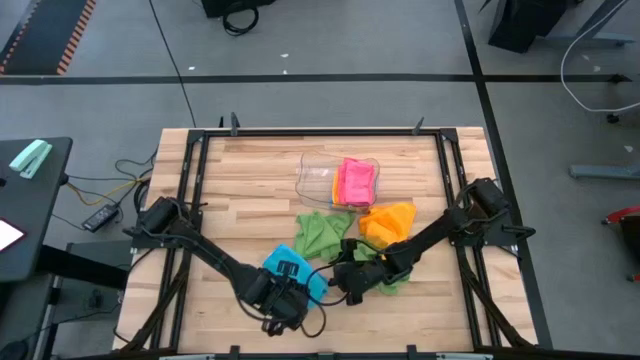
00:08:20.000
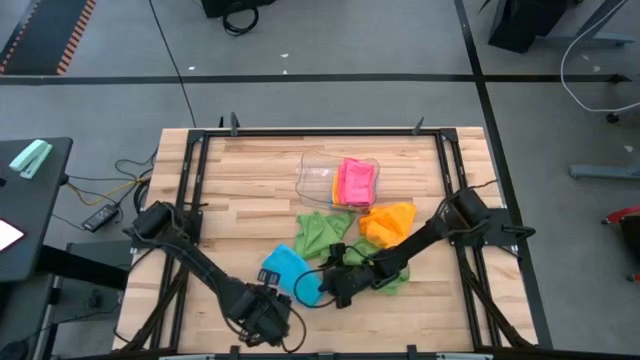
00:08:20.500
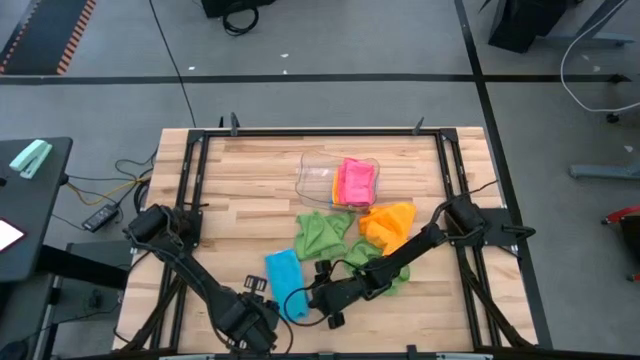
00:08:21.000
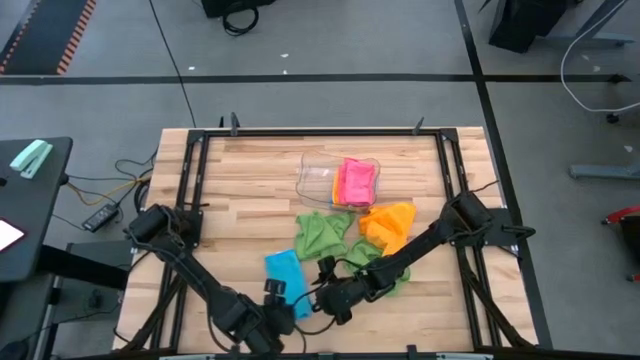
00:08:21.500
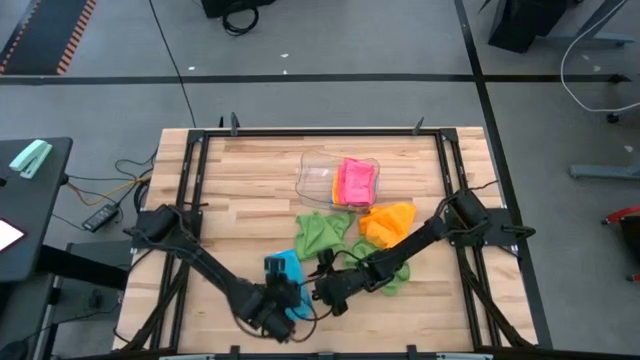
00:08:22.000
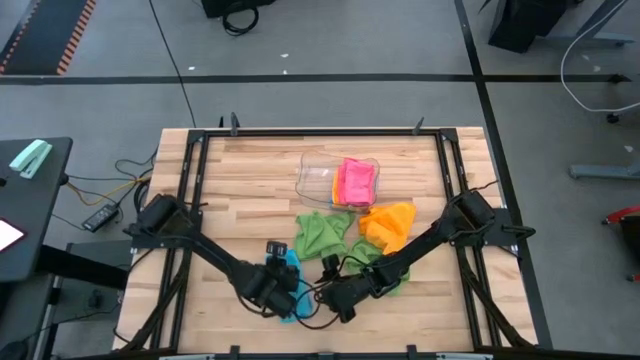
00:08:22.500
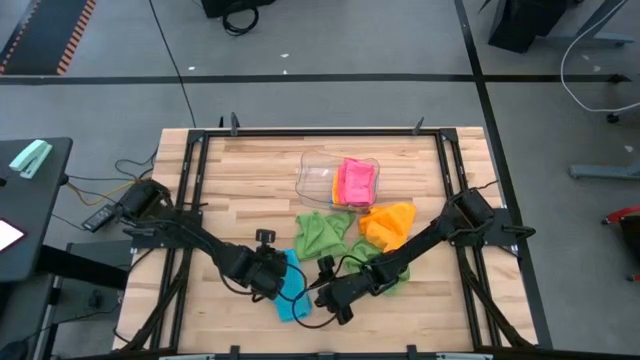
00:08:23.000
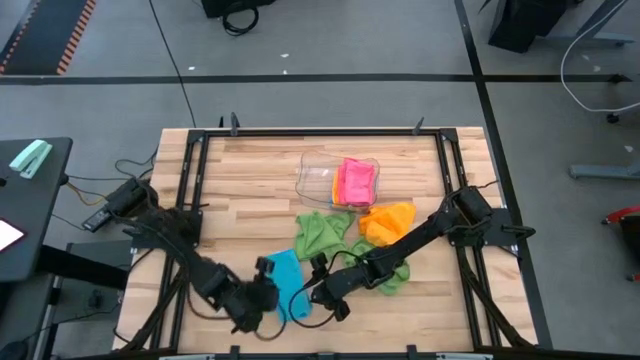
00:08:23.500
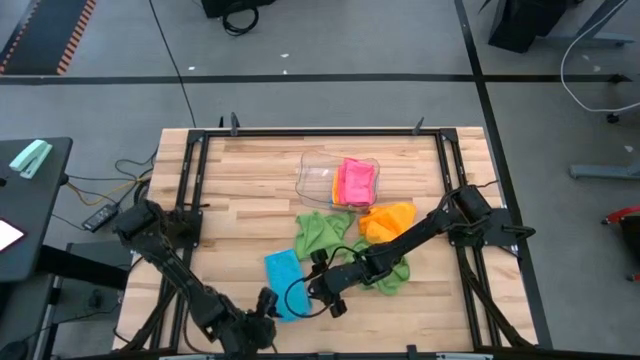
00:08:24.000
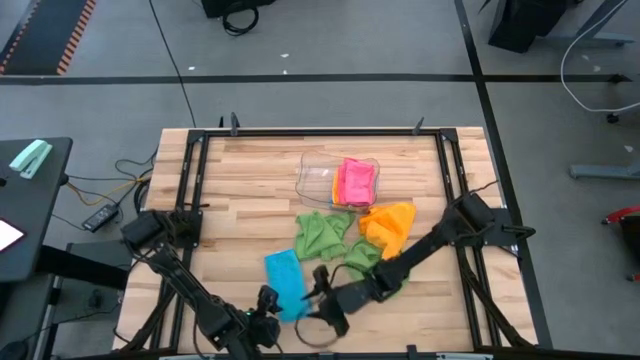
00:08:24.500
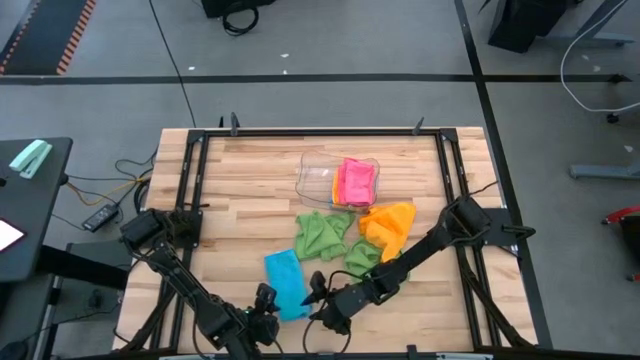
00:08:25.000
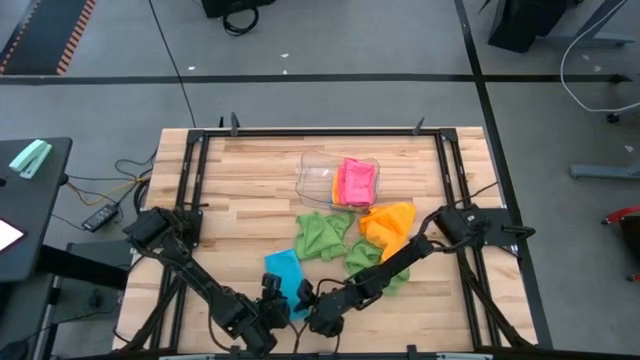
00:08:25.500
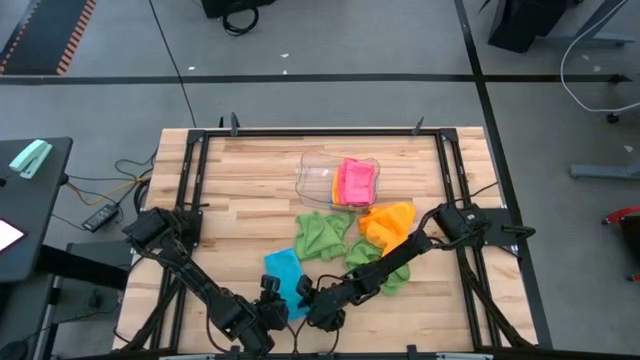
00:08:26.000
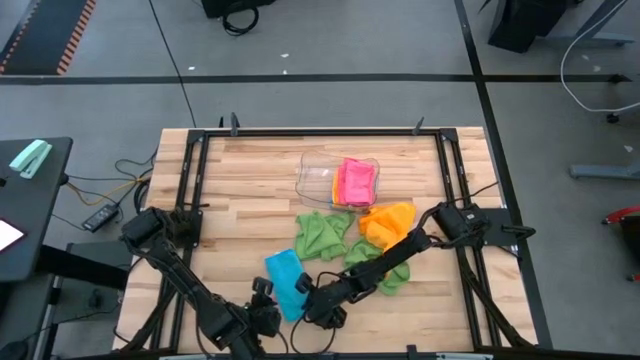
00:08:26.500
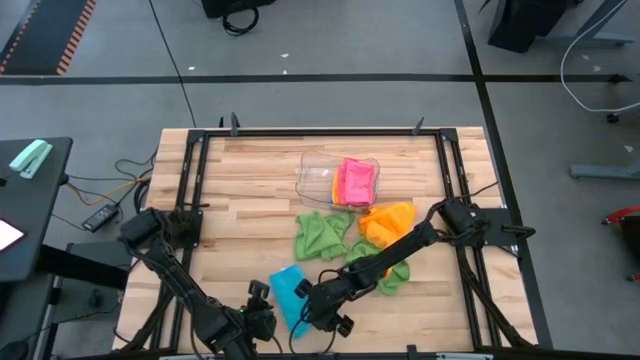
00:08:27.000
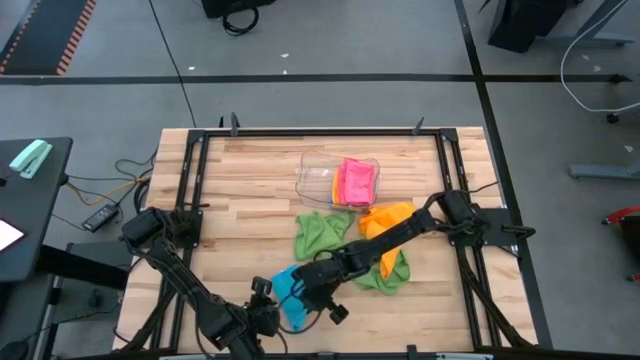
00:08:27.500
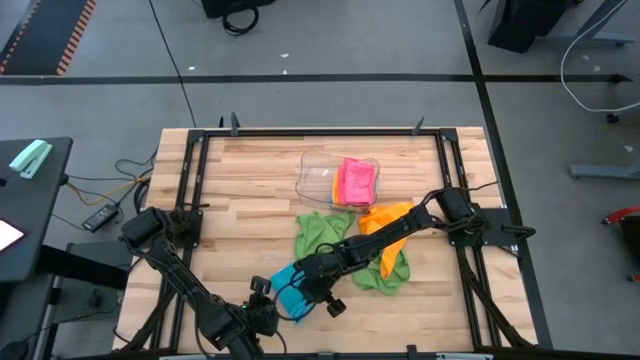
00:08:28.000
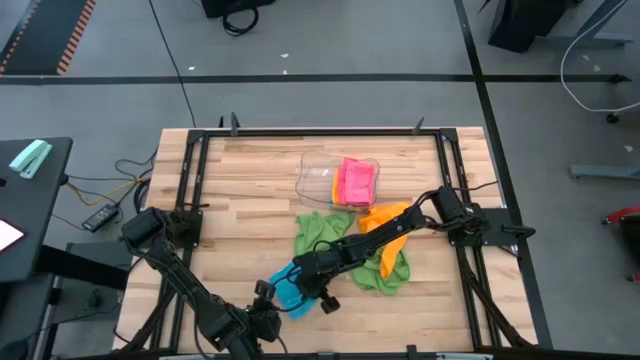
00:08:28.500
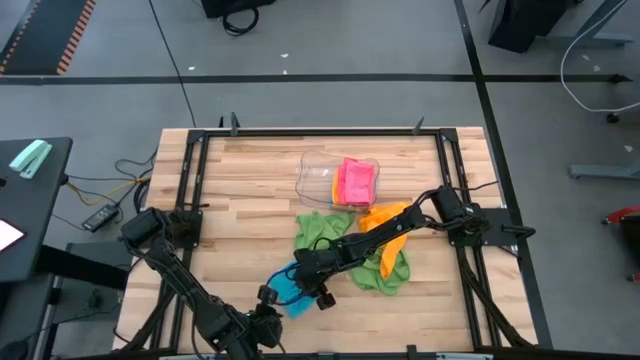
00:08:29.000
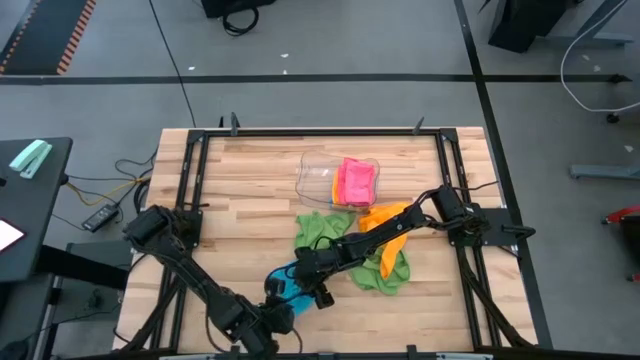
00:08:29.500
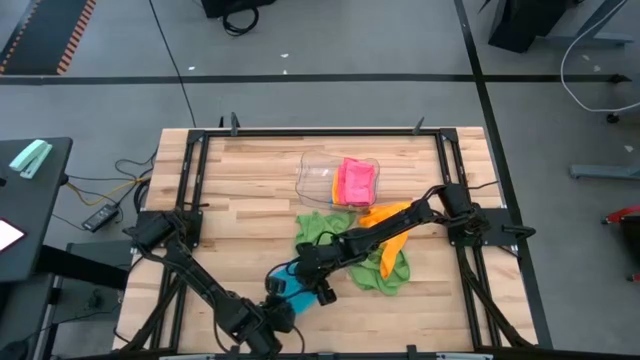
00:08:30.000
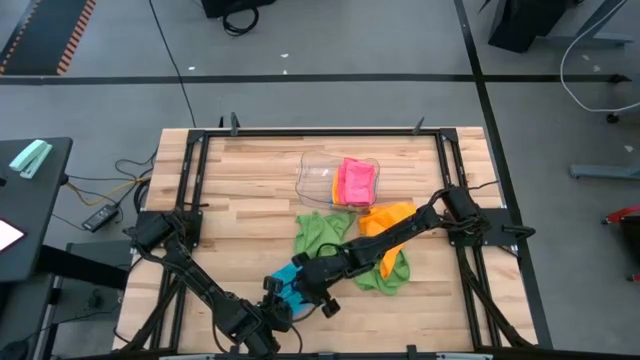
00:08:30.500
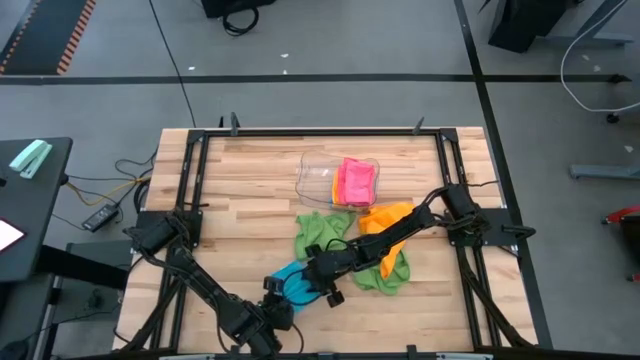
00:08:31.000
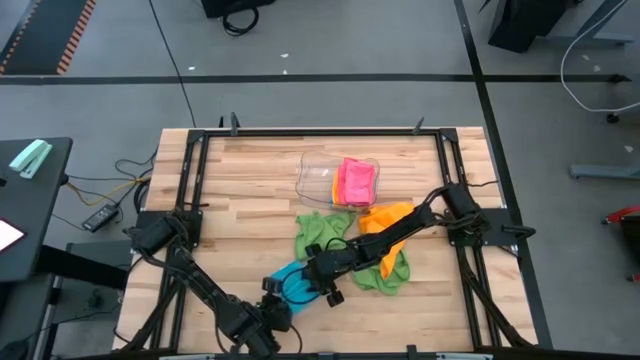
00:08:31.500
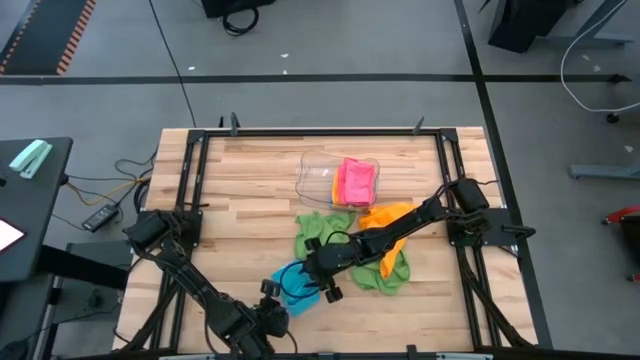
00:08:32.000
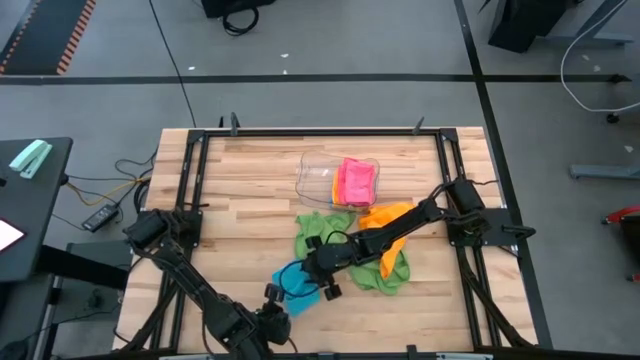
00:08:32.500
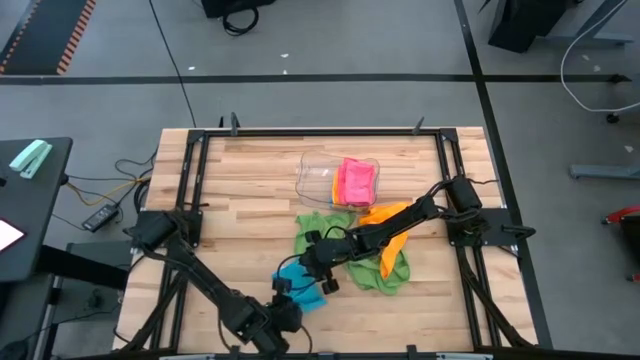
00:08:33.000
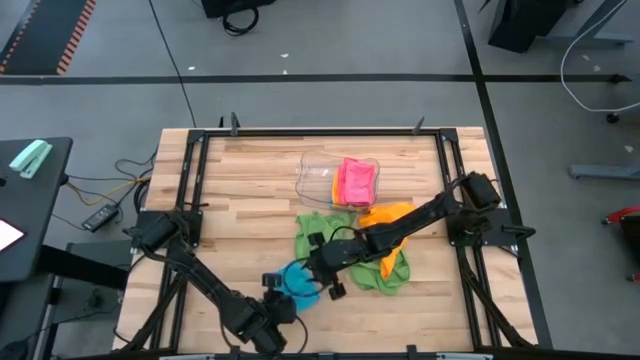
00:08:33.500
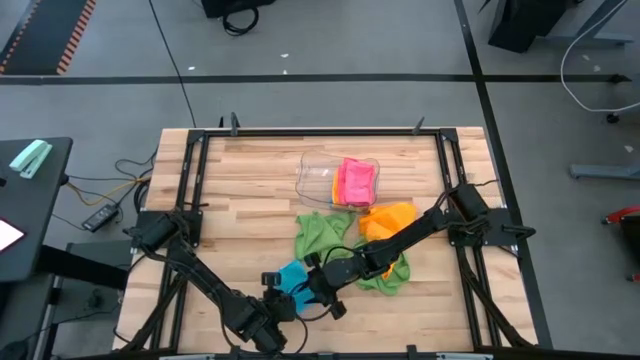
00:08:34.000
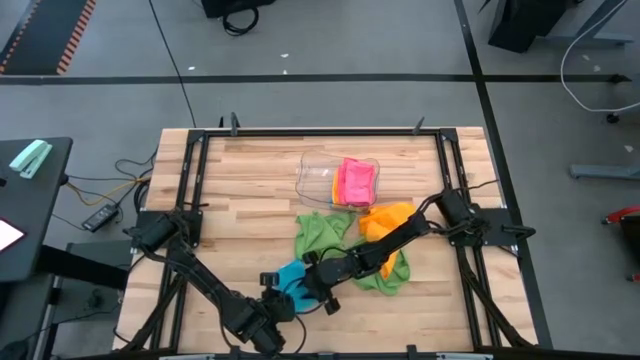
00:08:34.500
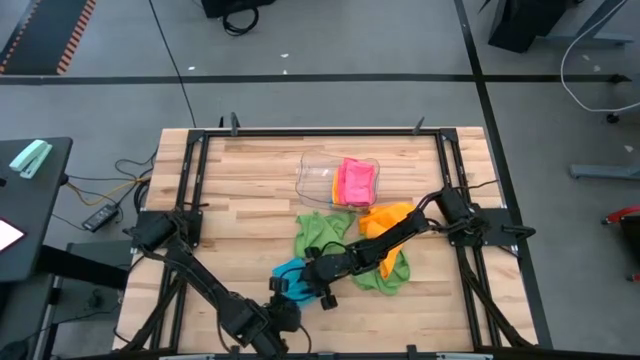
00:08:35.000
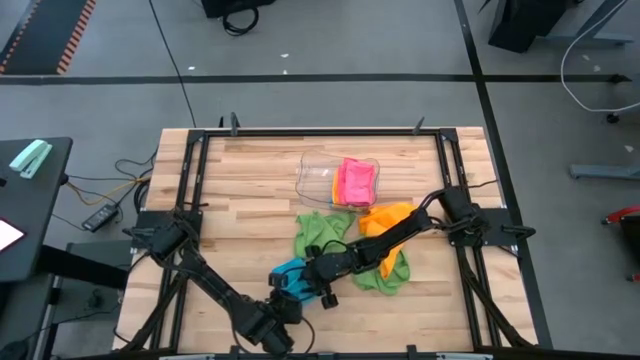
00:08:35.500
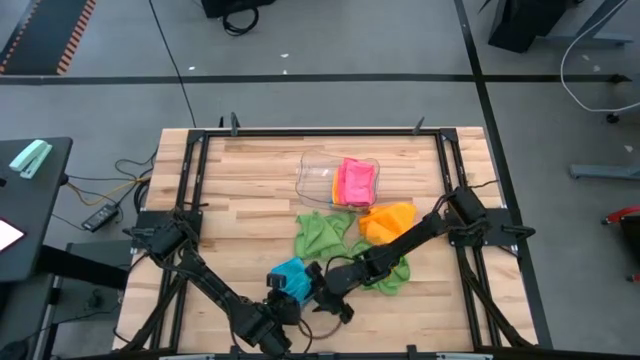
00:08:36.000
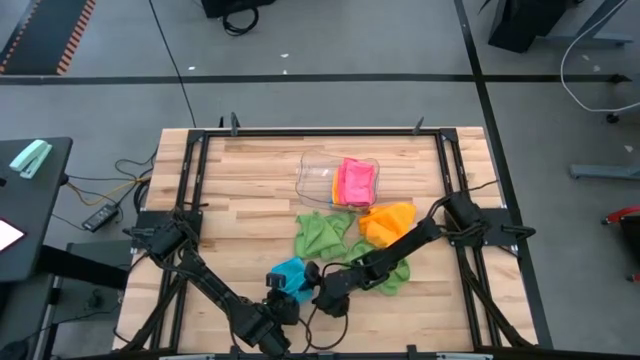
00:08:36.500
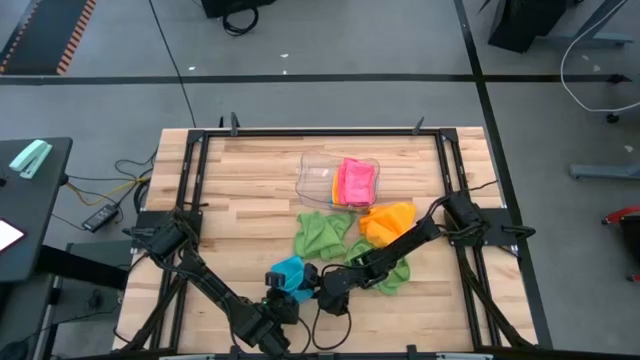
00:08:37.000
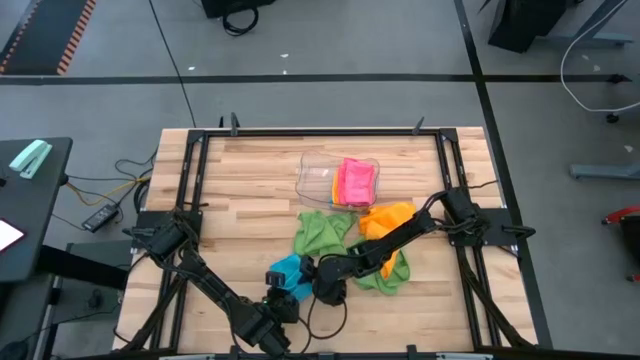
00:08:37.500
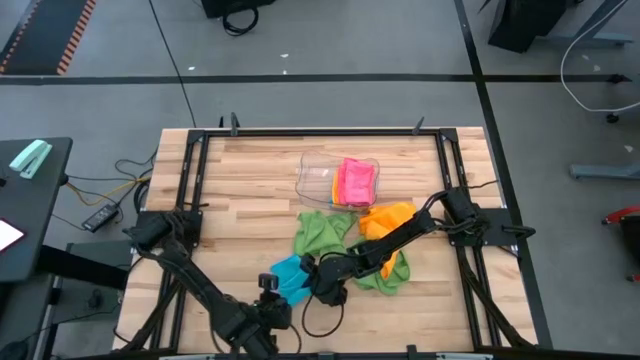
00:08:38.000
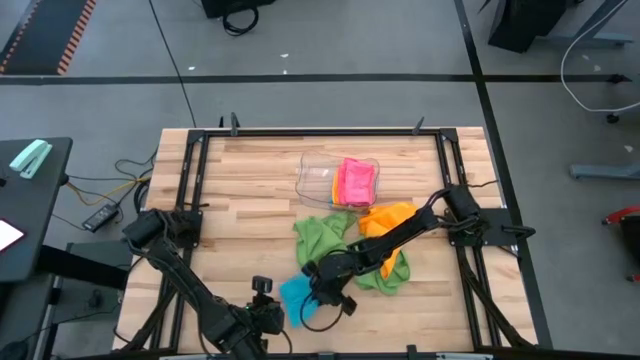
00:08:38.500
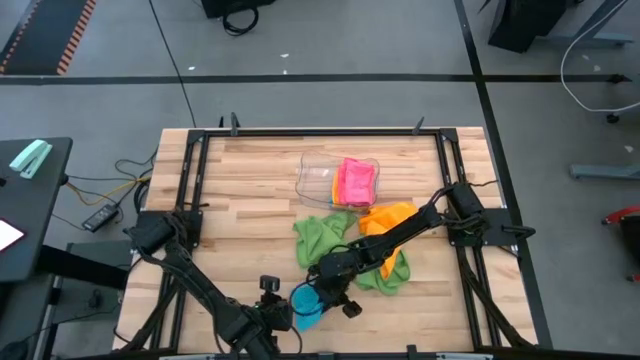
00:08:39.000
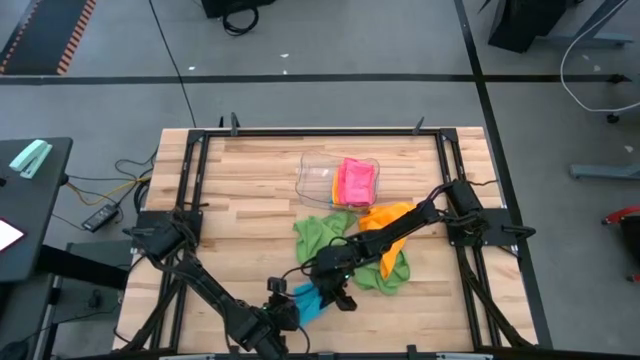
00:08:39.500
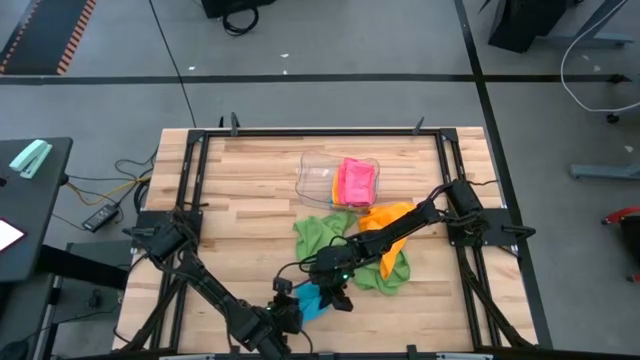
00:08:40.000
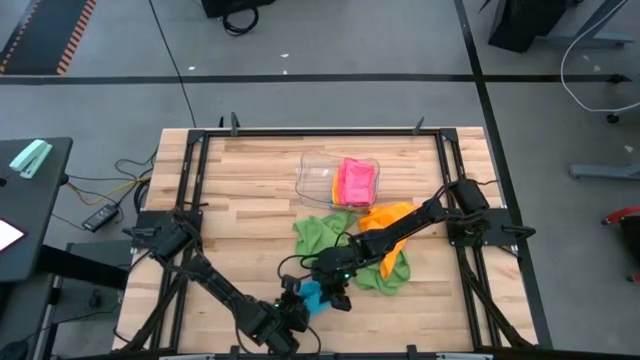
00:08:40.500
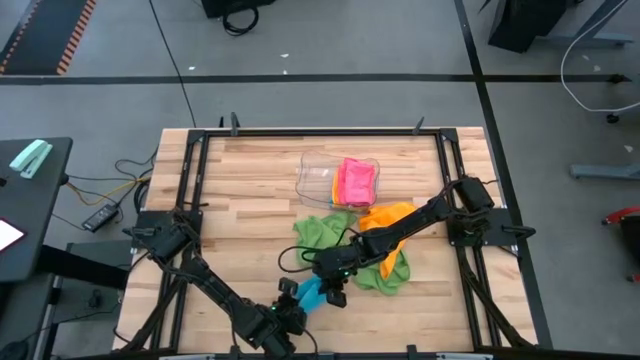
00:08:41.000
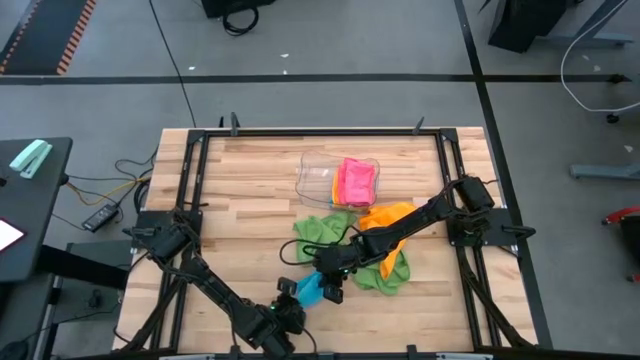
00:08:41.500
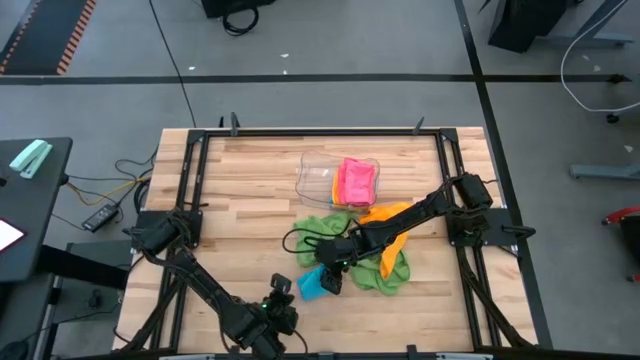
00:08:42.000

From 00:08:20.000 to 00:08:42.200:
Task: Fold microfiber towels
Fold the blue microfiber cloth
